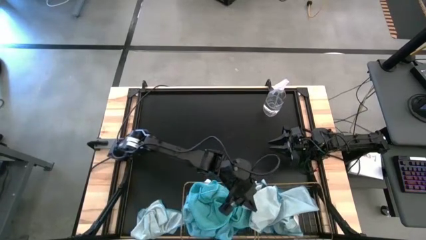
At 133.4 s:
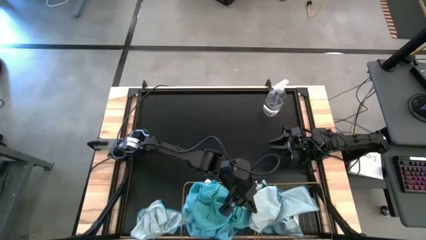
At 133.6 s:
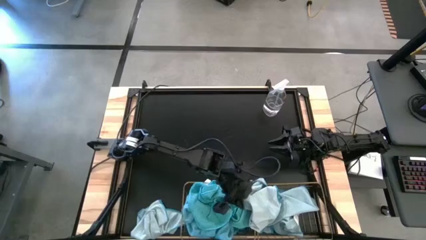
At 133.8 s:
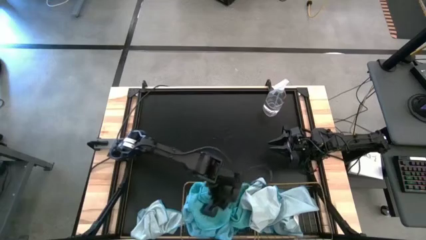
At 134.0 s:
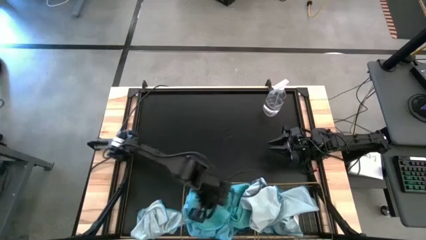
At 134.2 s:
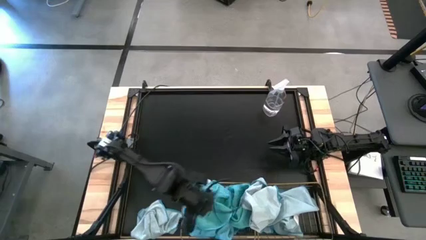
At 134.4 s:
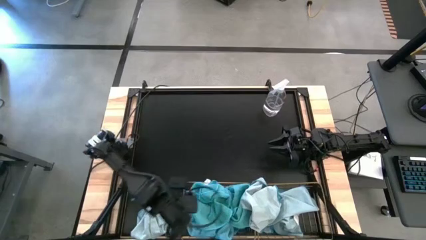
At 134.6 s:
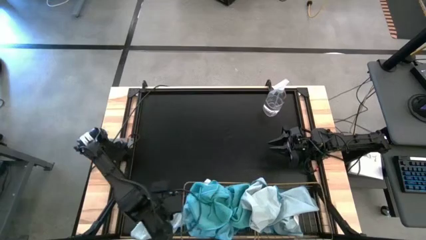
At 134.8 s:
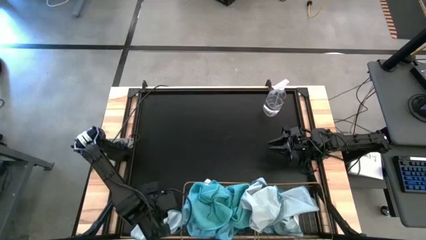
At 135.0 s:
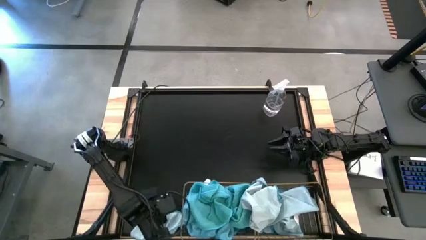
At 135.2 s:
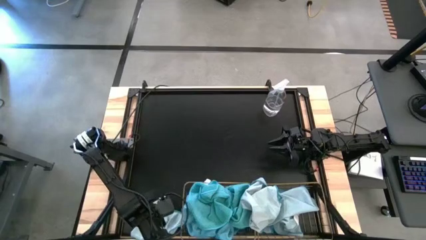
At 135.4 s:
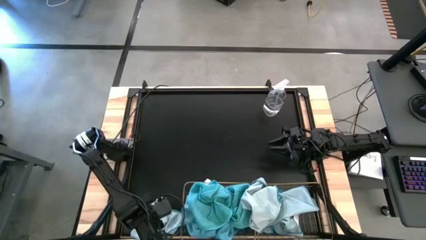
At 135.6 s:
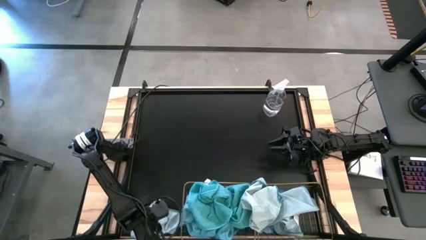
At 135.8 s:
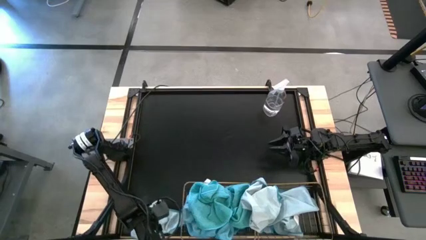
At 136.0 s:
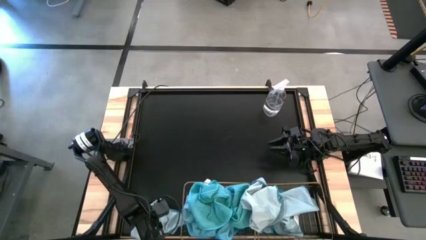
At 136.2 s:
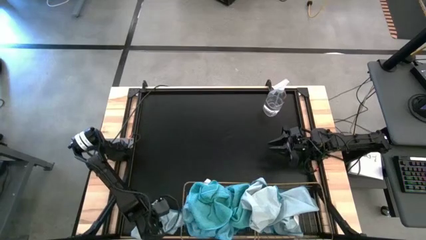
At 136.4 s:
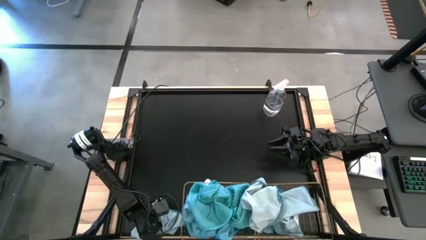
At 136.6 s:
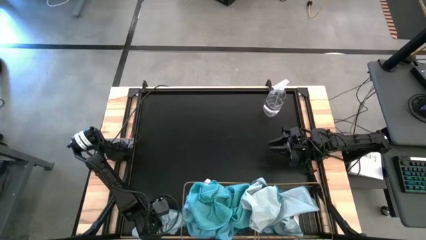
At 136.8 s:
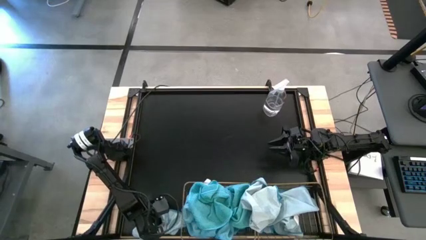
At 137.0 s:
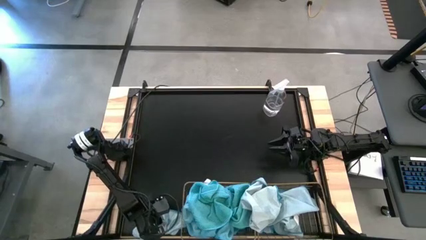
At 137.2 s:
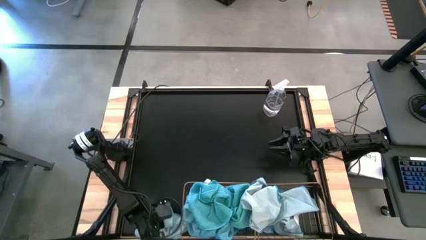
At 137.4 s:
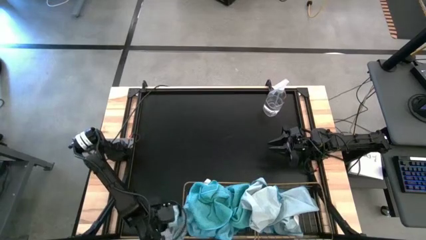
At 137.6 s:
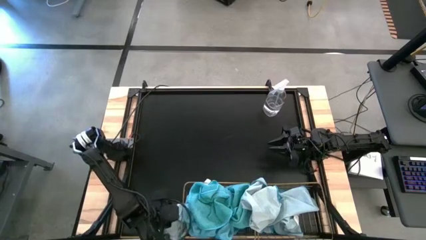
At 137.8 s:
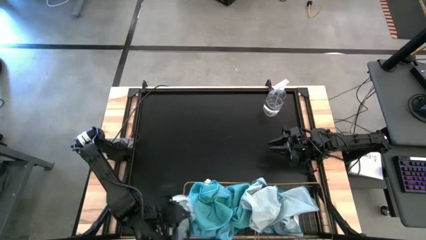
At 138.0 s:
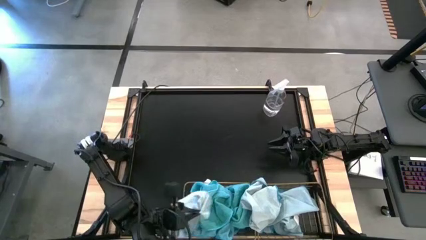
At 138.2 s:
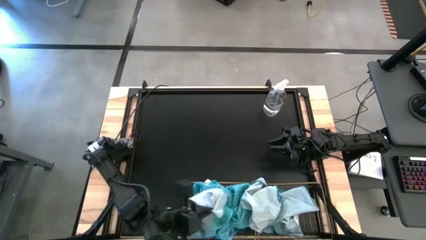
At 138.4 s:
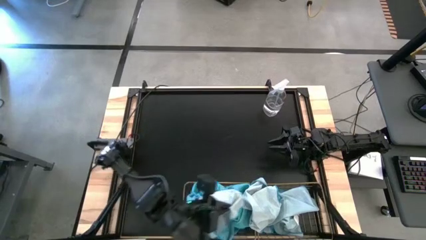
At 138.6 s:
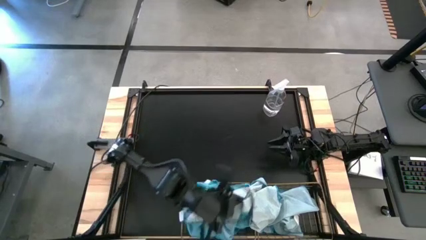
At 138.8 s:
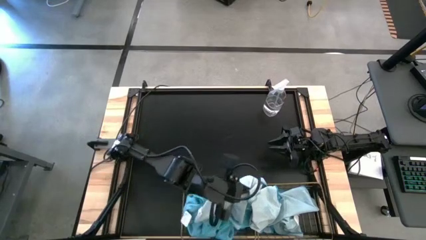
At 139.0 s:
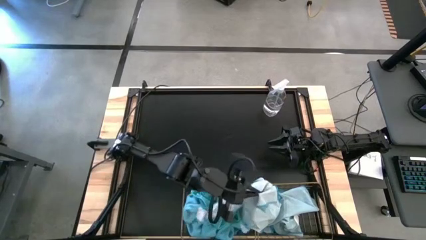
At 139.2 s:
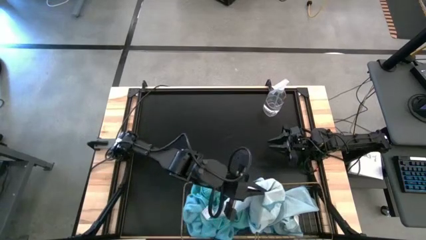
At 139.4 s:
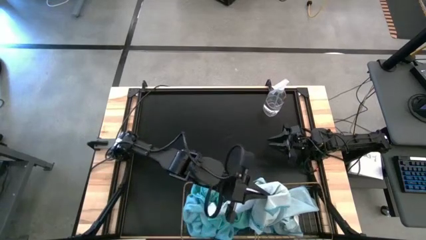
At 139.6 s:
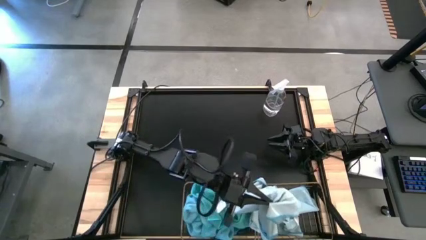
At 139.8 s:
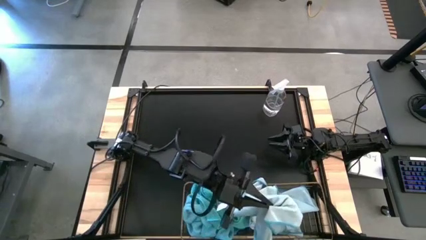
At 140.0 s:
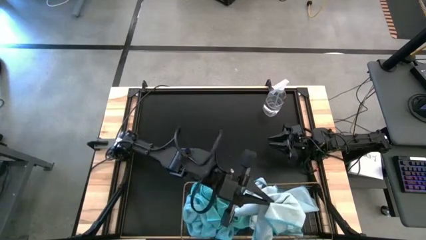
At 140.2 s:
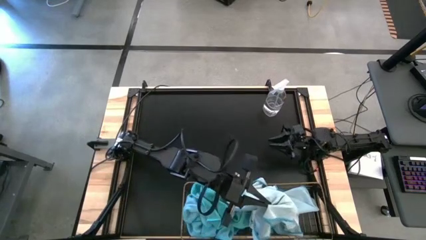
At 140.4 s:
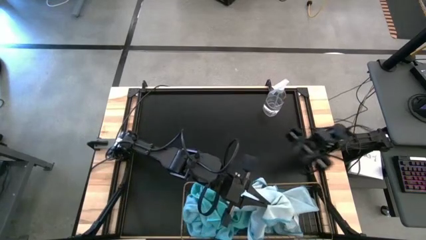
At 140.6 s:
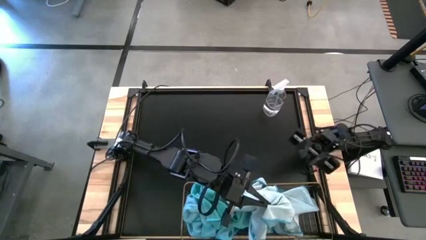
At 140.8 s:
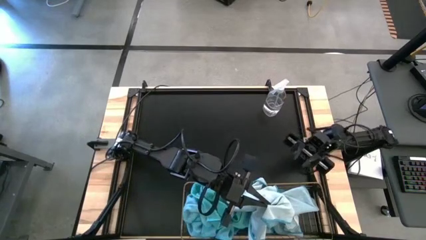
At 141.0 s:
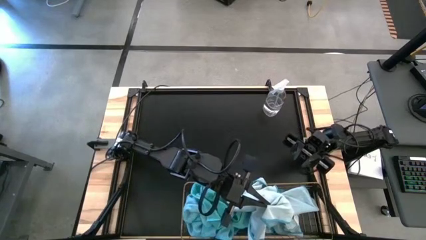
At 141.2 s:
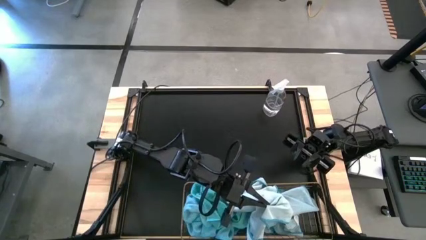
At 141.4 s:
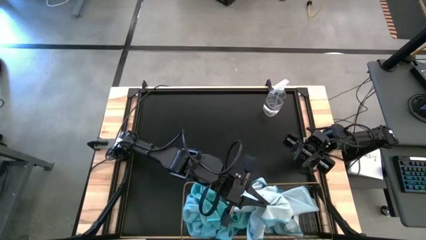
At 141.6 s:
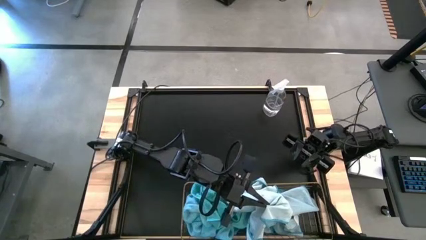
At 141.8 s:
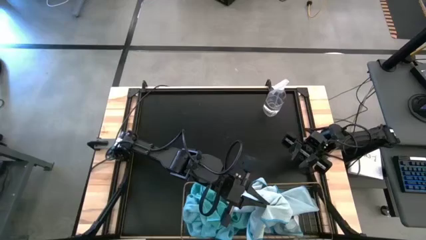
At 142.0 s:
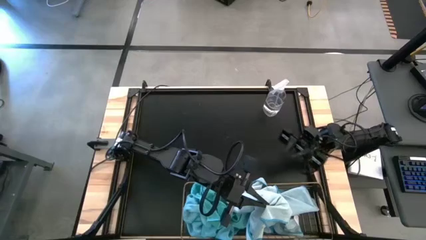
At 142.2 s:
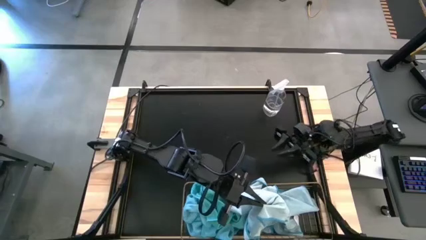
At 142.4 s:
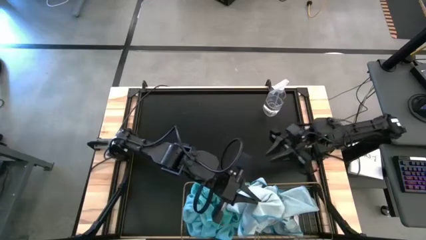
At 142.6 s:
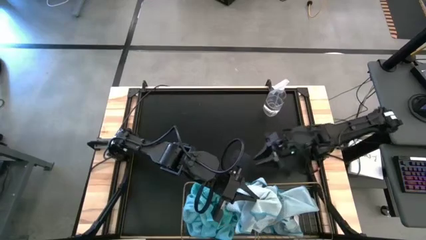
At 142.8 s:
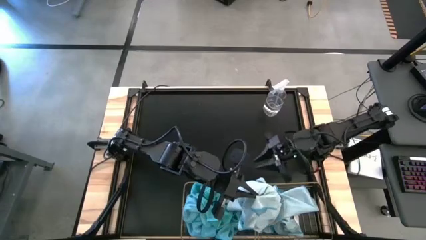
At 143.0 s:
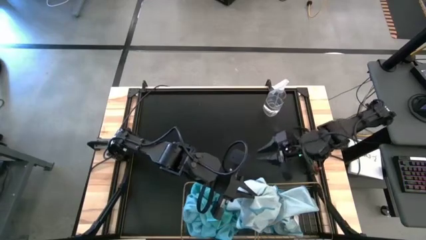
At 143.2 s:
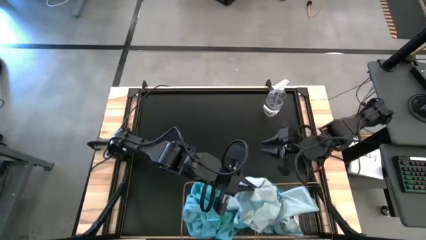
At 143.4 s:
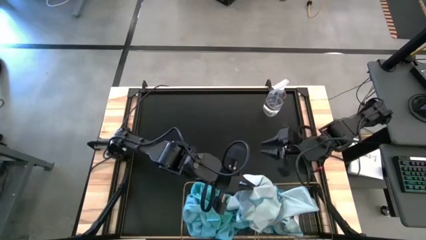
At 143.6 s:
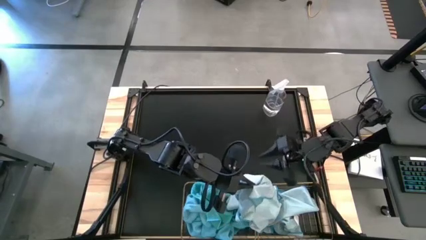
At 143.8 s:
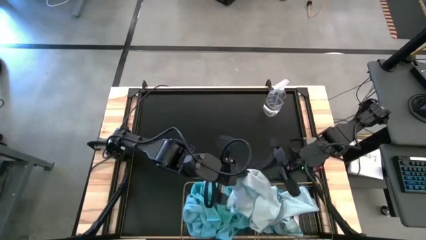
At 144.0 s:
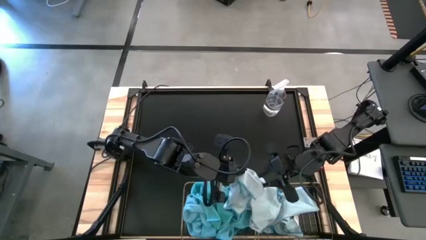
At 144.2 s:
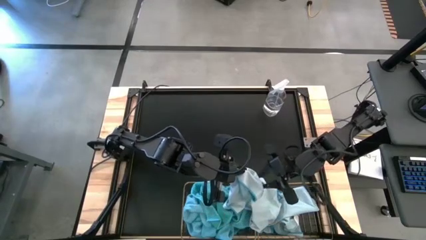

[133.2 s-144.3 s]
Task: Sort microfiber towel by color & place in baskets
Put the light blue towel into the right wire basket
